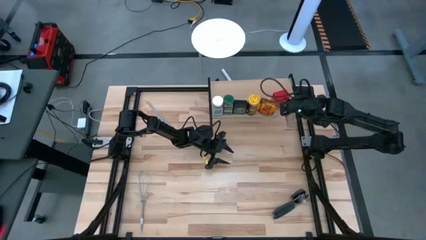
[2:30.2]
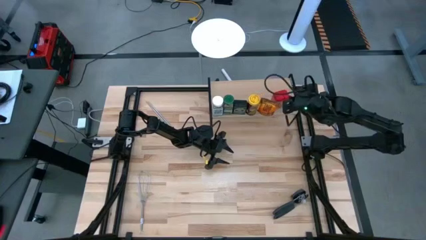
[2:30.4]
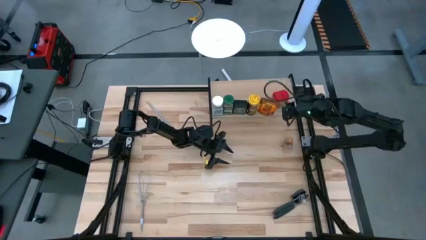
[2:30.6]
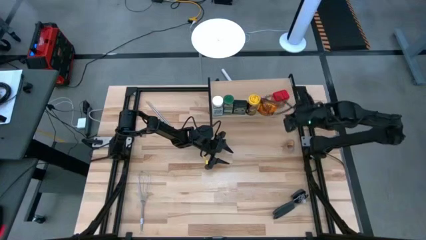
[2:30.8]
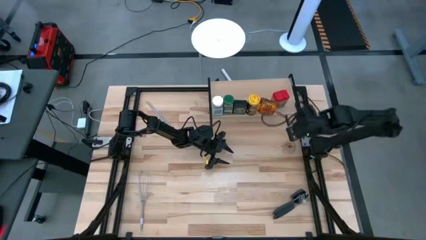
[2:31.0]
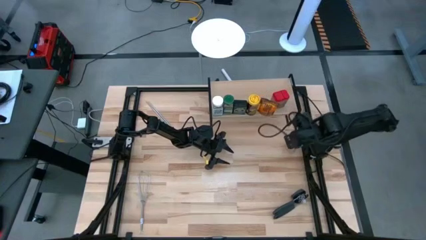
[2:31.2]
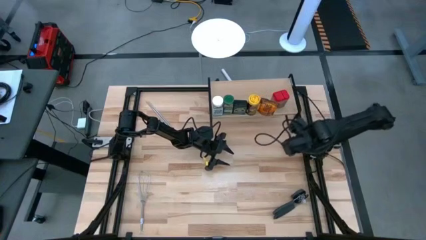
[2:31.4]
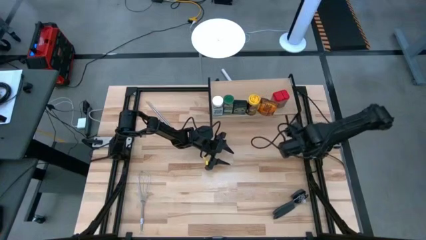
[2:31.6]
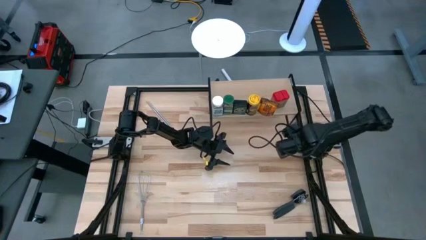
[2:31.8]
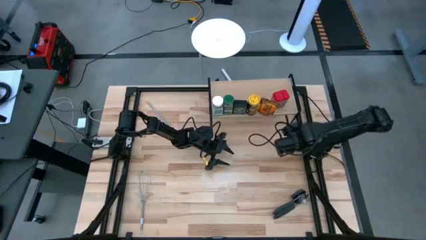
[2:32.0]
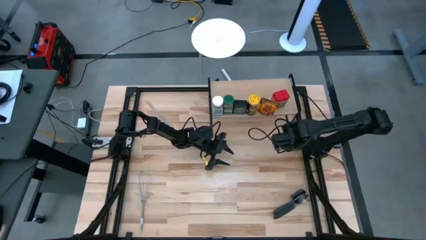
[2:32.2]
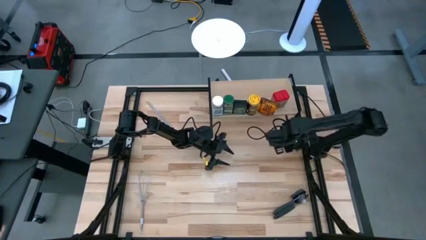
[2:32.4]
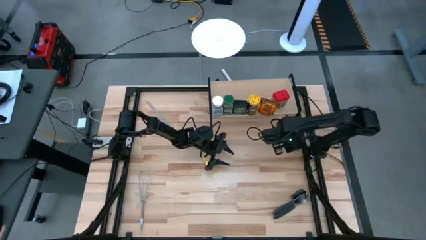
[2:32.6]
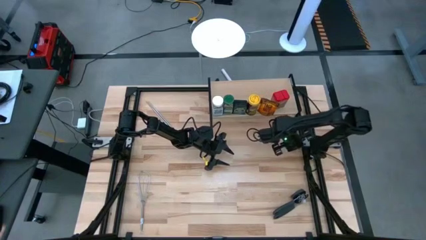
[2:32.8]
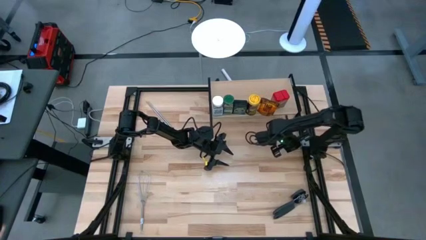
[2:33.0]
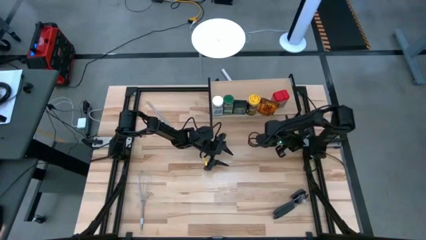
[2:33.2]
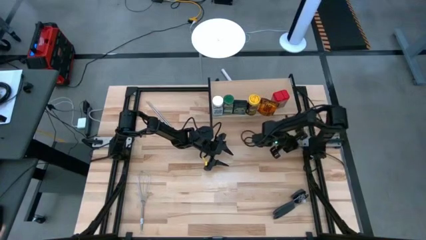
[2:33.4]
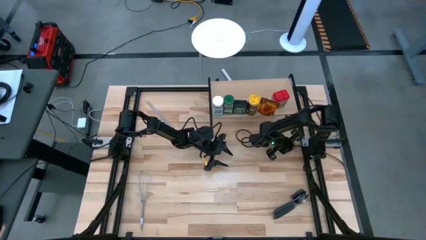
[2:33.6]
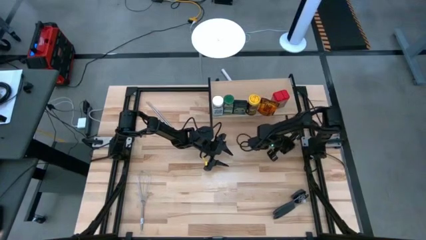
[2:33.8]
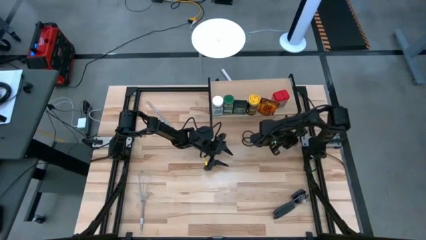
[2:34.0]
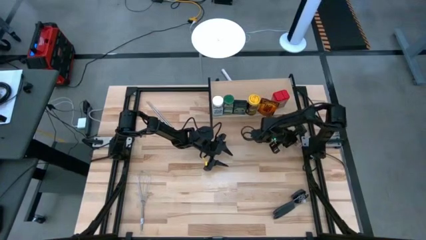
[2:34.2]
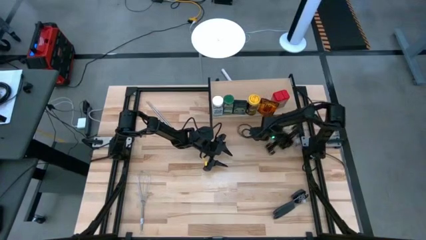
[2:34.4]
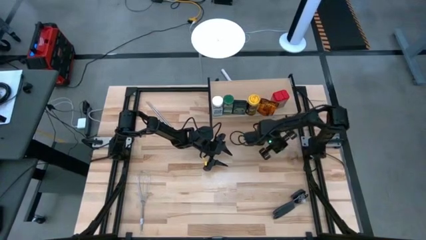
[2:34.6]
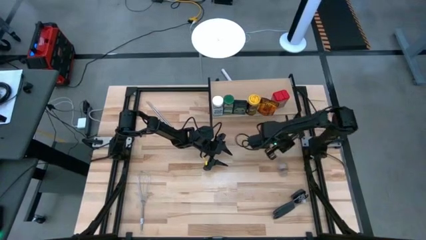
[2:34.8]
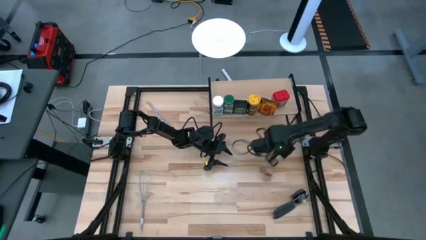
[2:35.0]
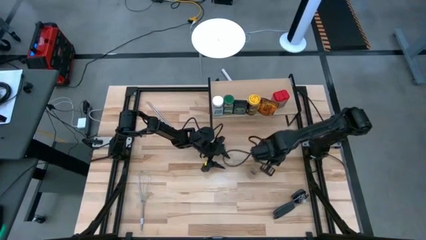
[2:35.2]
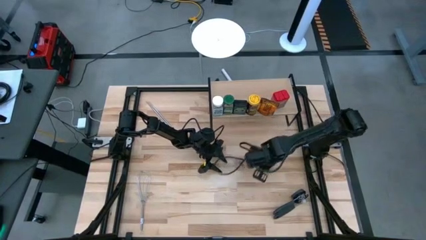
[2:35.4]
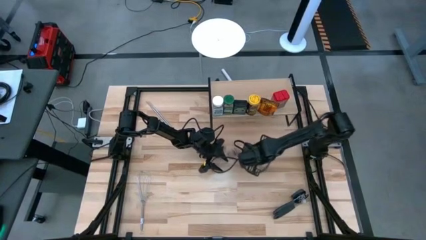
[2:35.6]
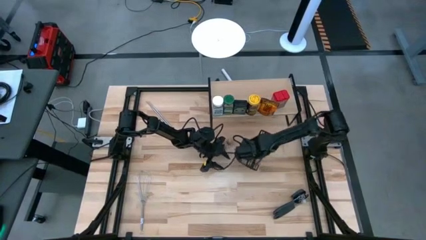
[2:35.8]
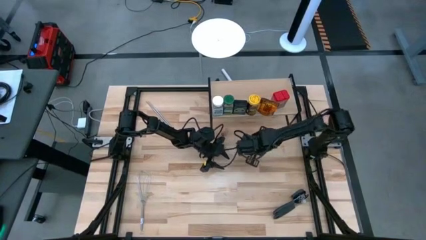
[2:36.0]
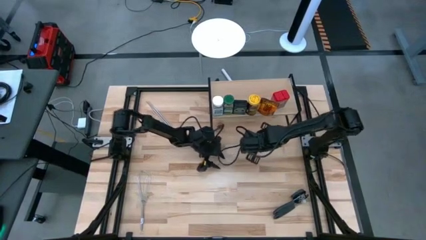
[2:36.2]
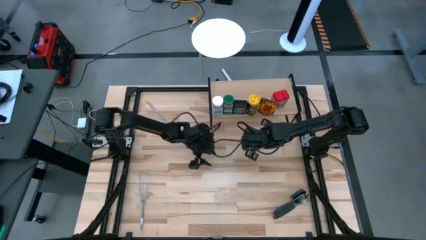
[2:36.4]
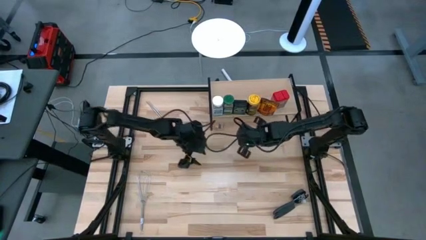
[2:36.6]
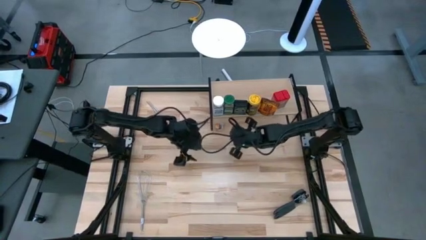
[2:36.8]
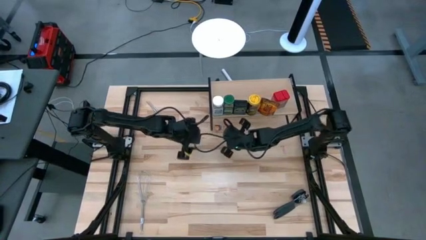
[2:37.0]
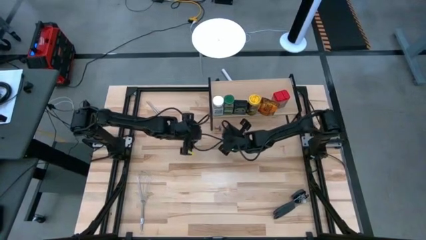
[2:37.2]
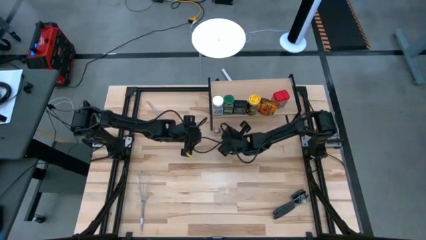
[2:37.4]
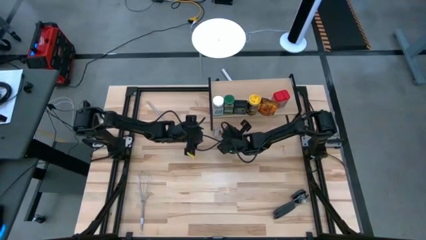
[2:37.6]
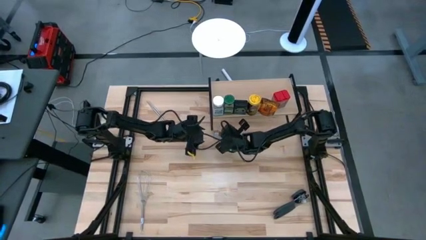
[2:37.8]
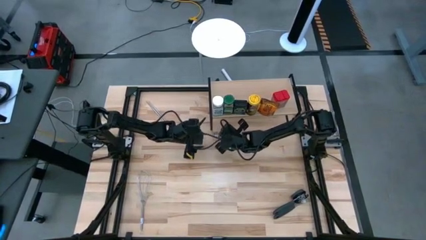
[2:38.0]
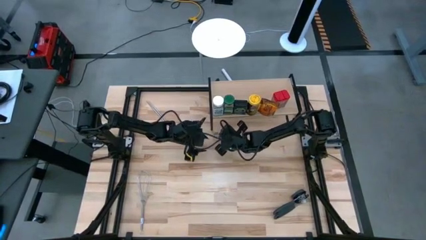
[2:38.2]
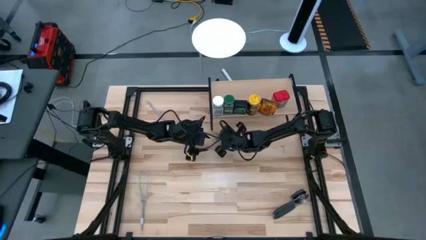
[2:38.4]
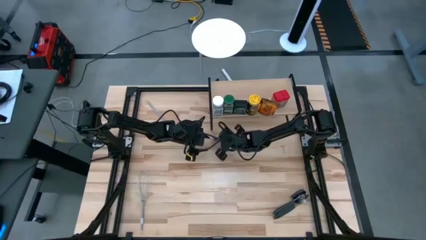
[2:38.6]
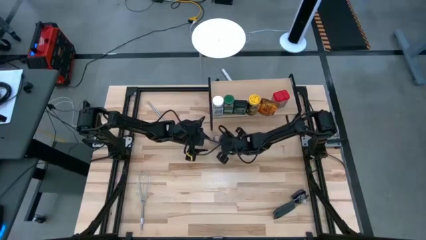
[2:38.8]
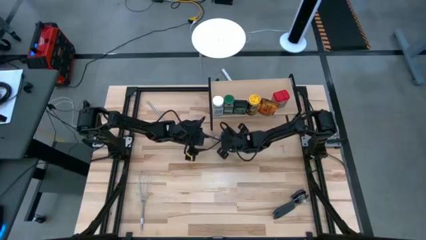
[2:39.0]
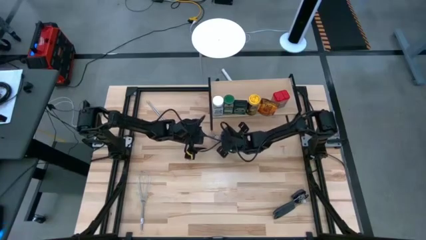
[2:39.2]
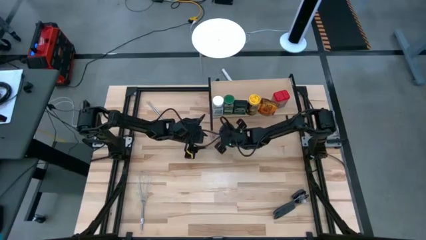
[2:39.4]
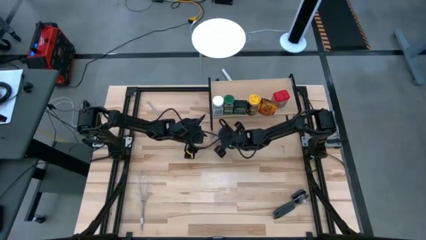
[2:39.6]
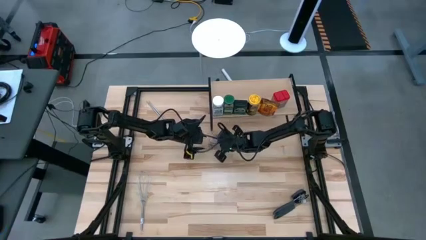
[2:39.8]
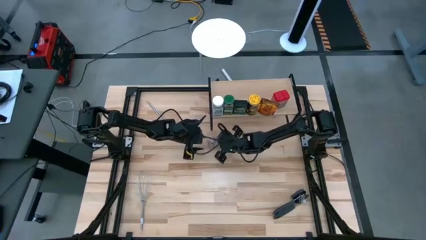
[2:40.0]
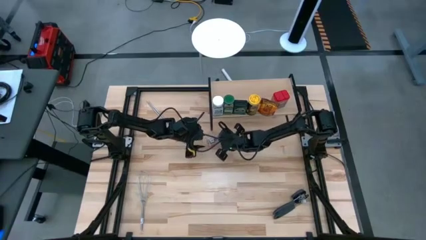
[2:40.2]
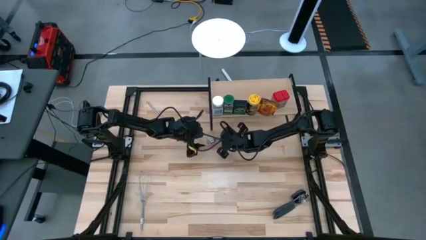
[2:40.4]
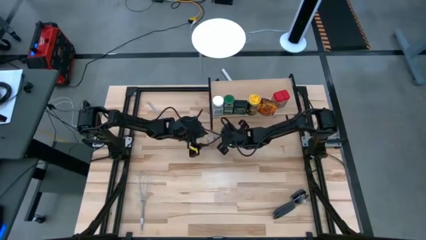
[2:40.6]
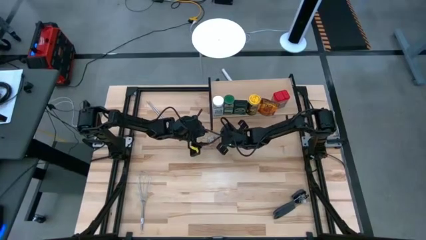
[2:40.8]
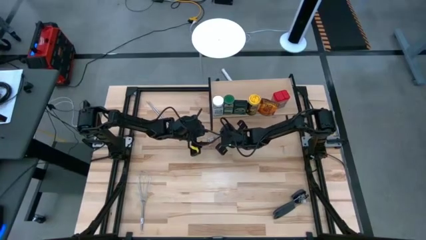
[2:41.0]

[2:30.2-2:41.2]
Task: Shelf spices
Put the transparent seasoning bottle on the shelf

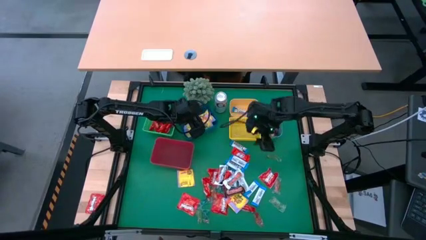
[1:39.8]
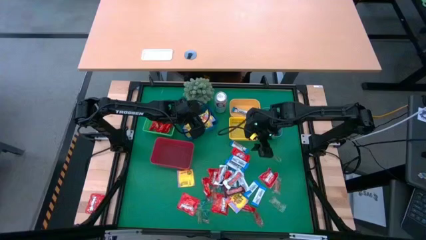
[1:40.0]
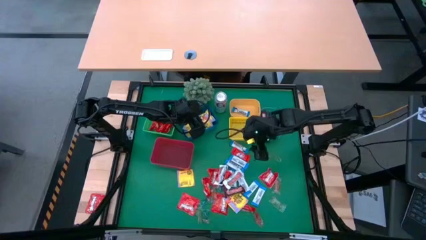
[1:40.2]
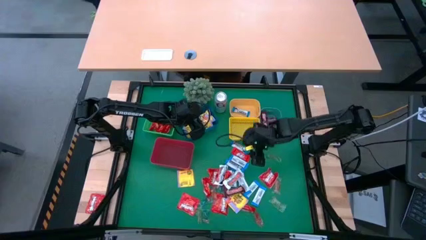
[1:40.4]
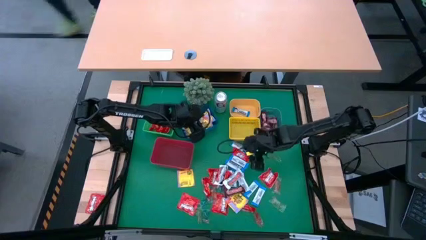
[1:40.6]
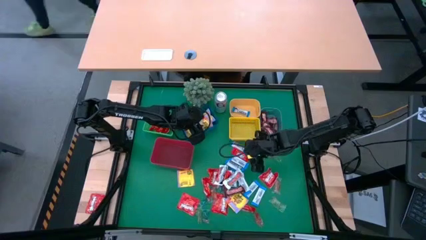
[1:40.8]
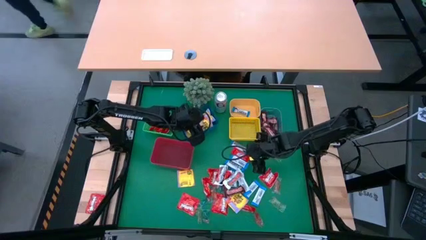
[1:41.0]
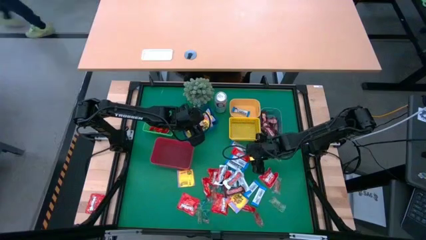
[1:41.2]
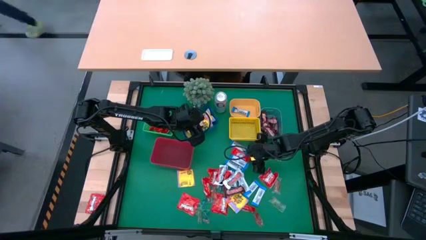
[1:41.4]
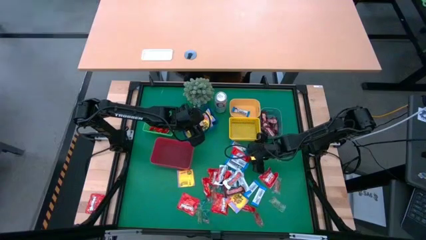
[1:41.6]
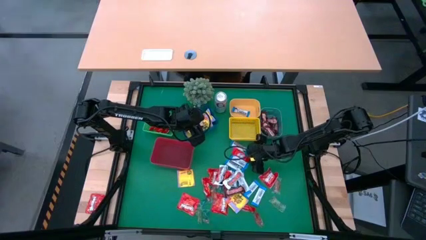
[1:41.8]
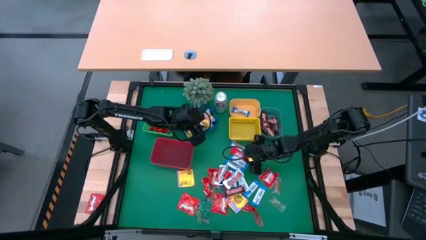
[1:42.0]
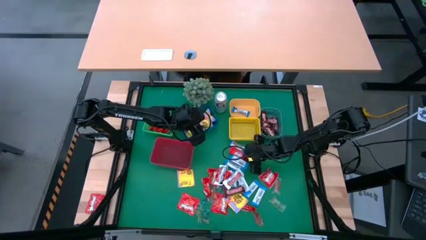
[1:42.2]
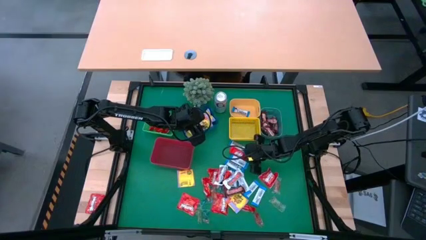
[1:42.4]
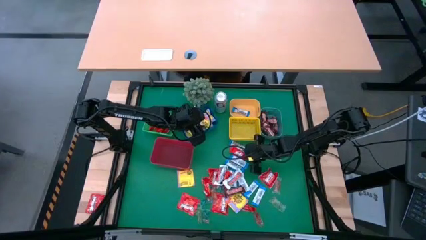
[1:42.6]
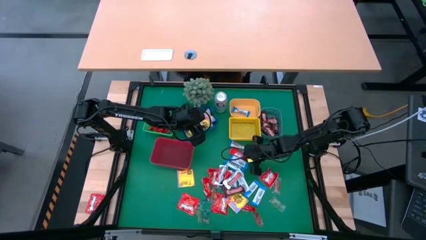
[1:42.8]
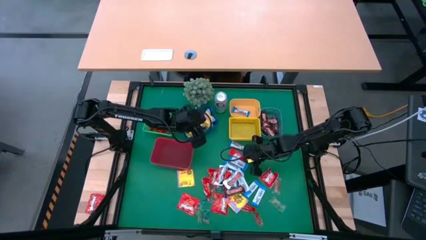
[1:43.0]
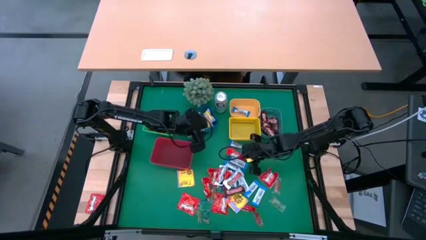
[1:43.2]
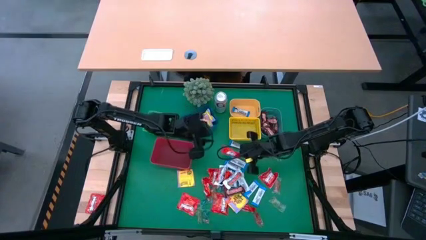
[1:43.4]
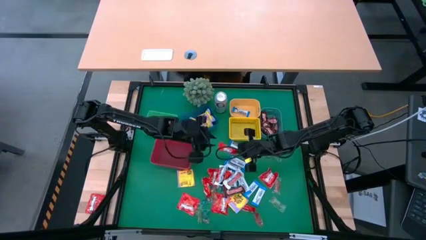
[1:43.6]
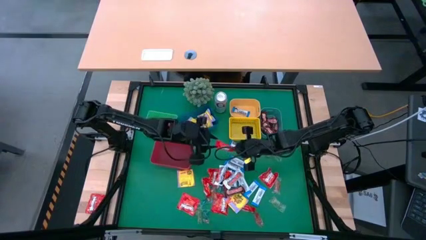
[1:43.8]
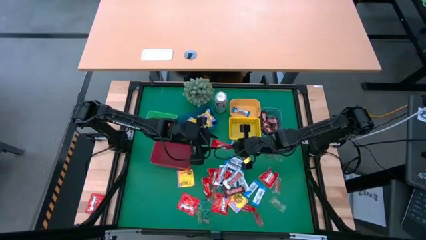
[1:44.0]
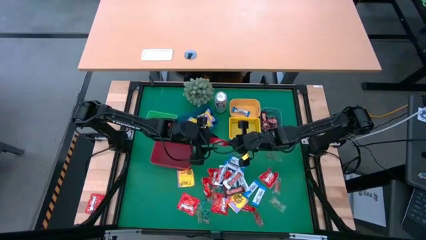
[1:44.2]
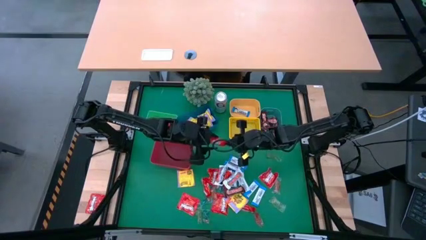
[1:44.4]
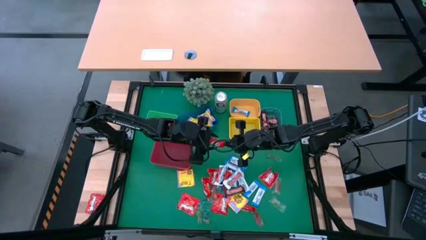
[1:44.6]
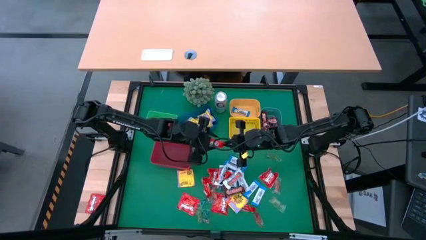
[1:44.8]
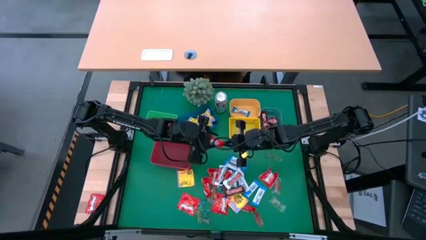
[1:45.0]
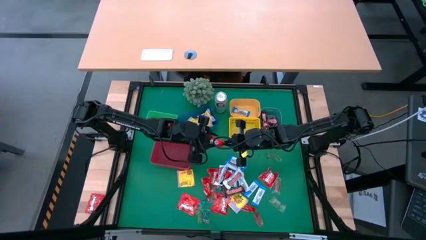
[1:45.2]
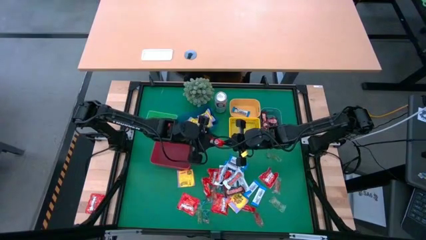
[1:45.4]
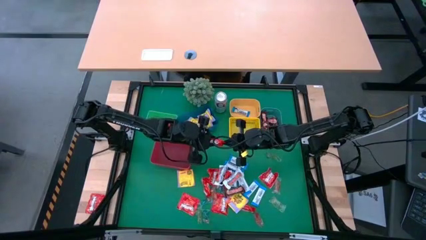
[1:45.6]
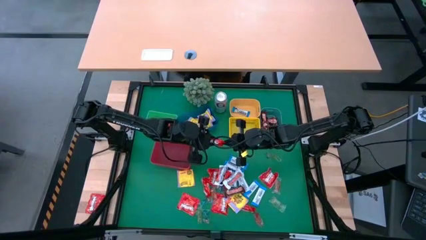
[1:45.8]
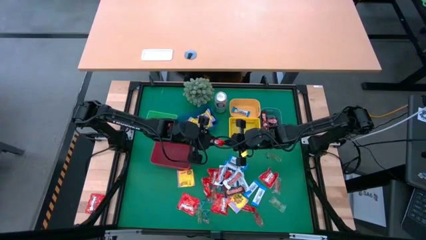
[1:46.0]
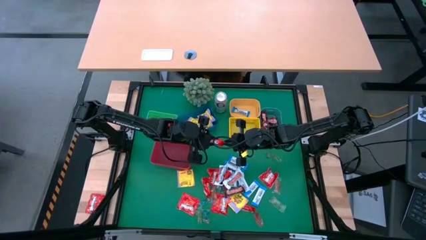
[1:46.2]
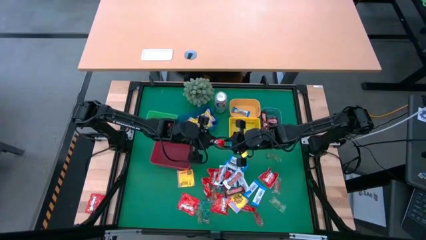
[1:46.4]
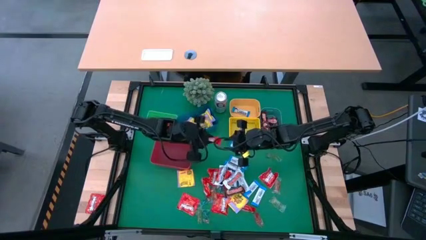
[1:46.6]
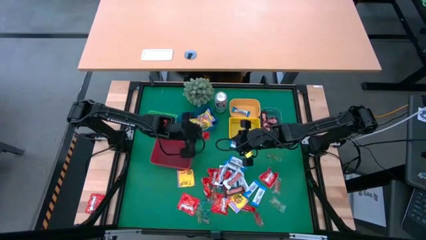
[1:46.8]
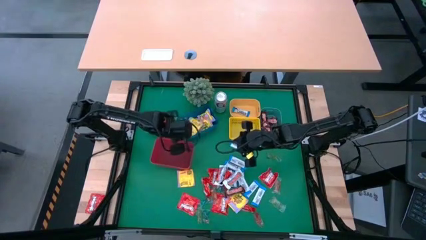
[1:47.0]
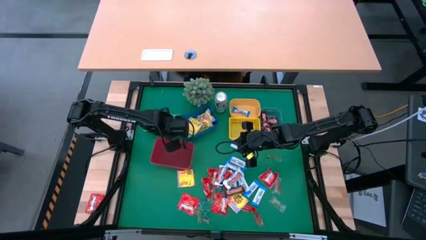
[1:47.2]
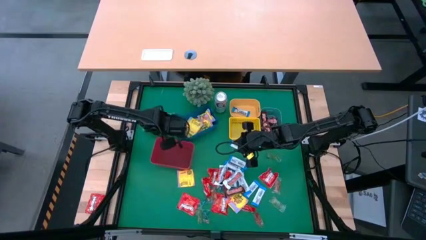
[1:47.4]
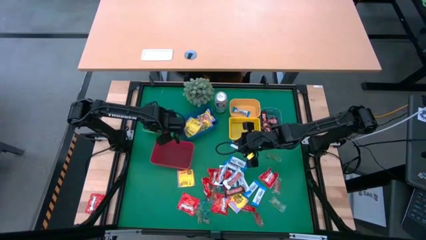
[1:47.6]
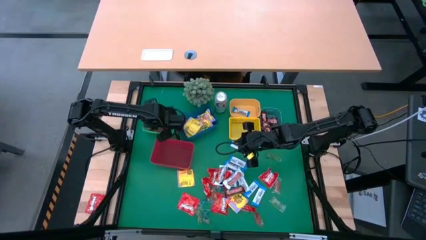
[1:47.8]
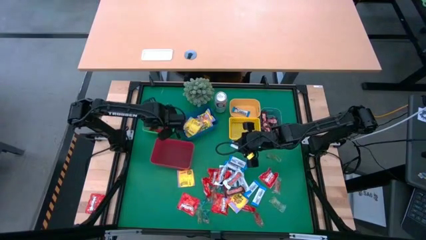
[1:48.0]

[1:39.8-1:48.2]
Task: Sort candy
Put the red chocolate bar into the green bin
